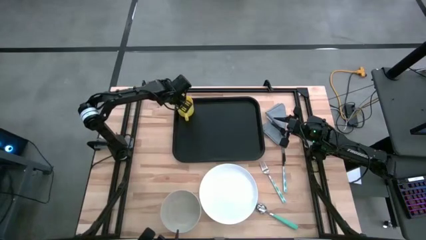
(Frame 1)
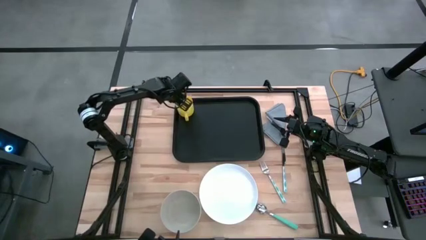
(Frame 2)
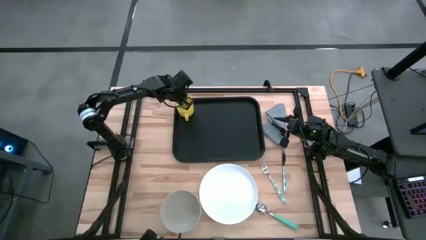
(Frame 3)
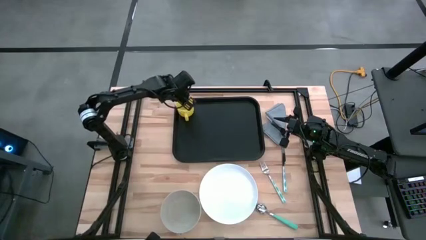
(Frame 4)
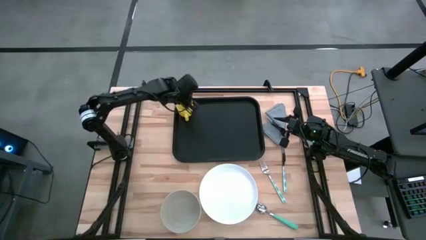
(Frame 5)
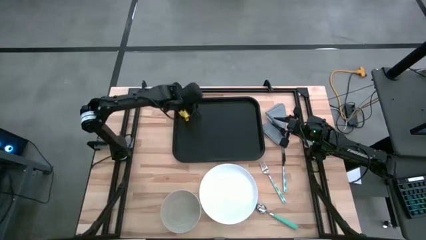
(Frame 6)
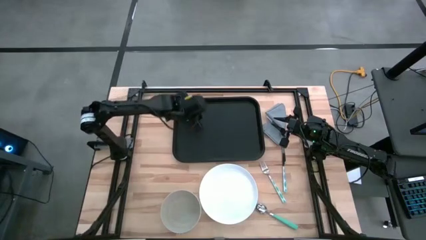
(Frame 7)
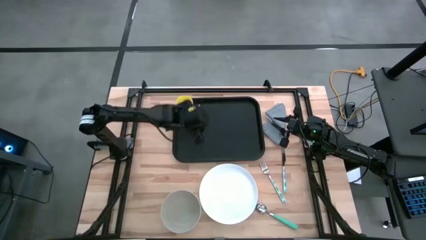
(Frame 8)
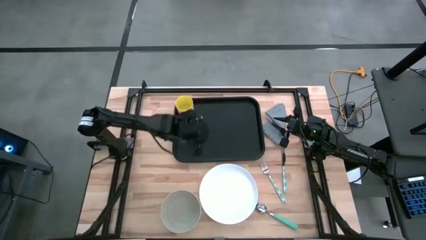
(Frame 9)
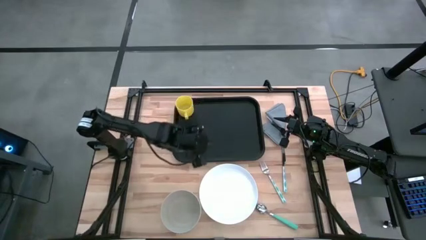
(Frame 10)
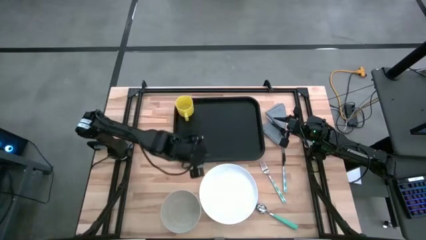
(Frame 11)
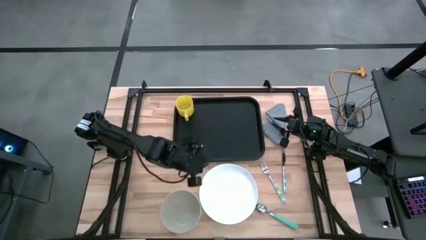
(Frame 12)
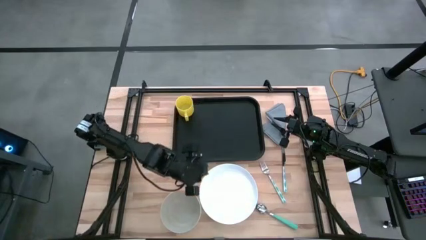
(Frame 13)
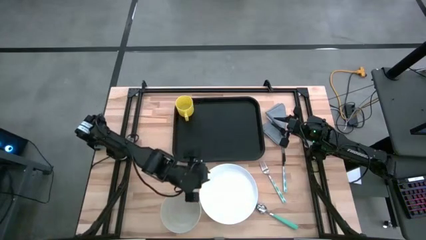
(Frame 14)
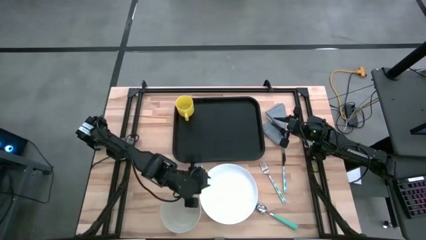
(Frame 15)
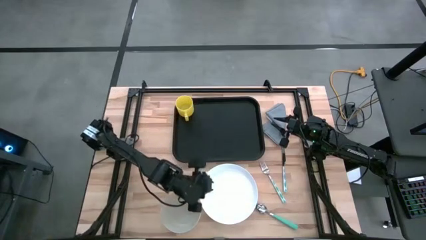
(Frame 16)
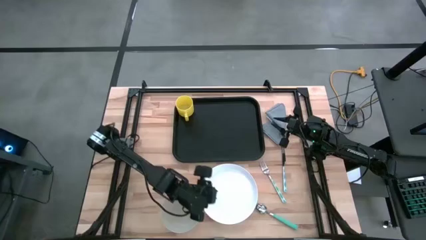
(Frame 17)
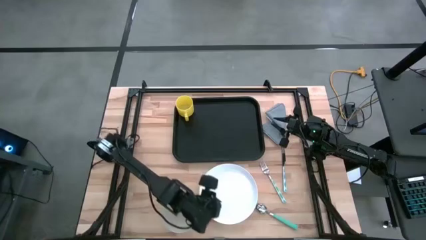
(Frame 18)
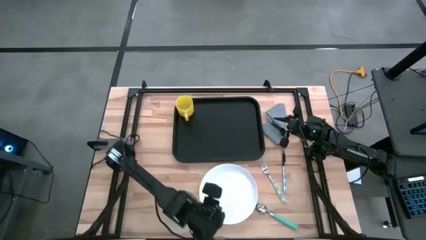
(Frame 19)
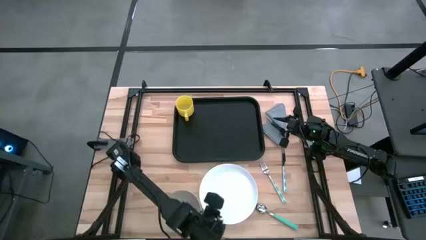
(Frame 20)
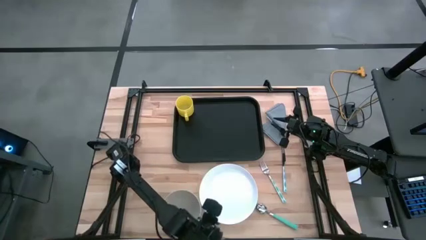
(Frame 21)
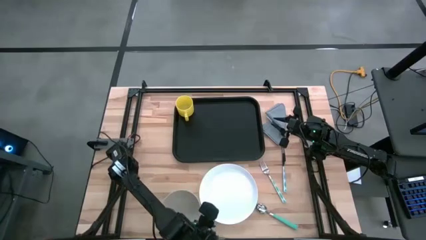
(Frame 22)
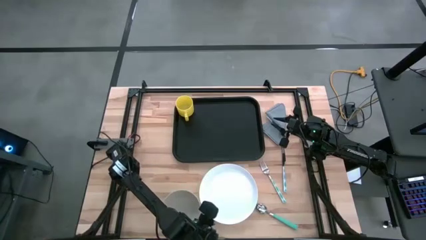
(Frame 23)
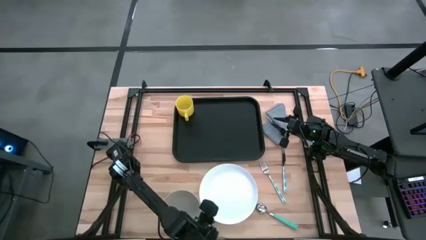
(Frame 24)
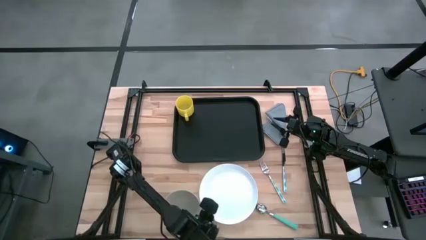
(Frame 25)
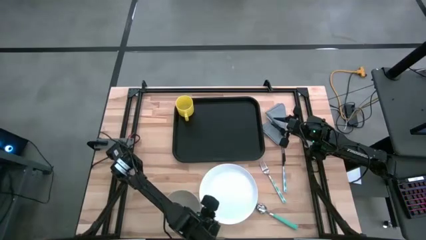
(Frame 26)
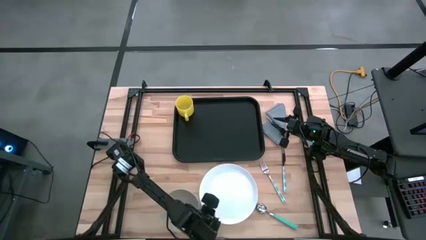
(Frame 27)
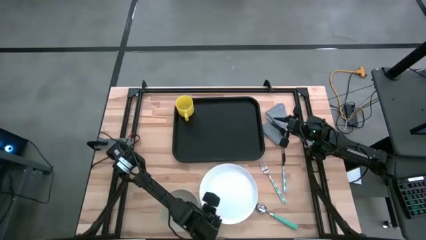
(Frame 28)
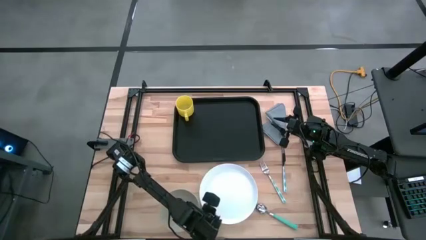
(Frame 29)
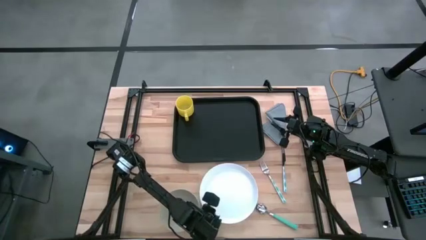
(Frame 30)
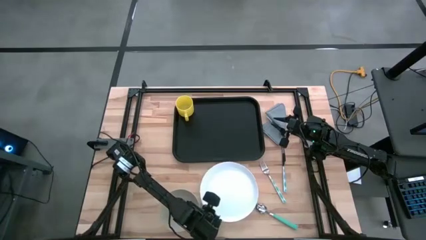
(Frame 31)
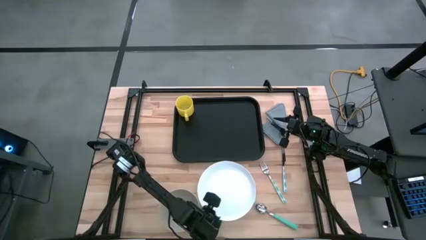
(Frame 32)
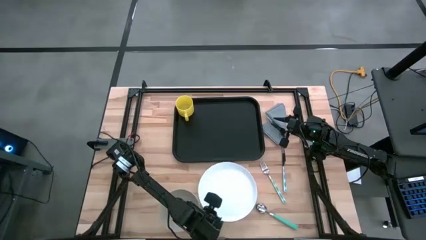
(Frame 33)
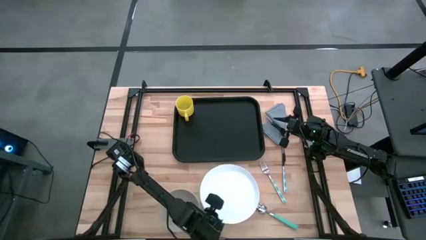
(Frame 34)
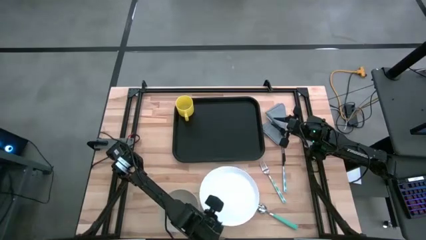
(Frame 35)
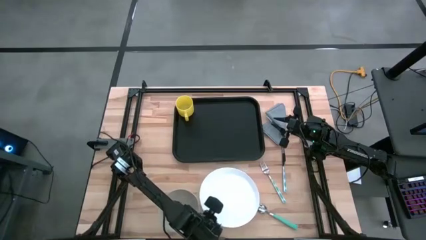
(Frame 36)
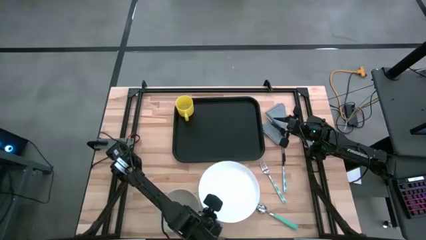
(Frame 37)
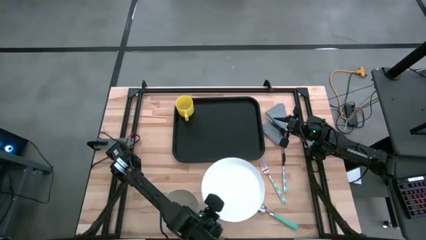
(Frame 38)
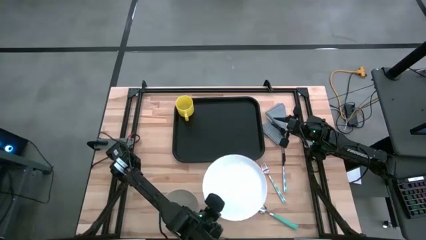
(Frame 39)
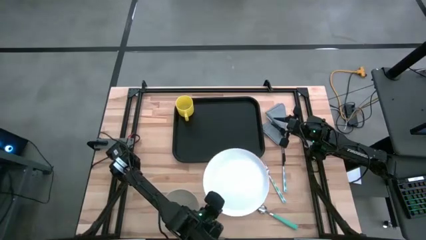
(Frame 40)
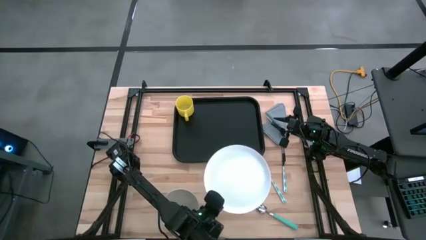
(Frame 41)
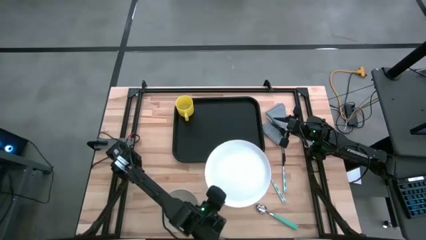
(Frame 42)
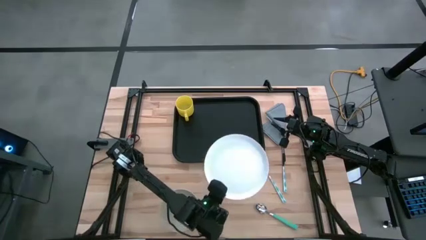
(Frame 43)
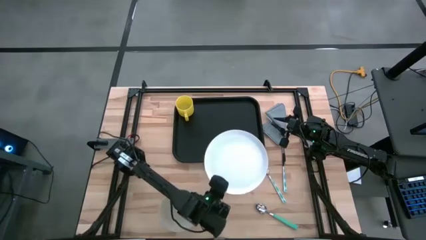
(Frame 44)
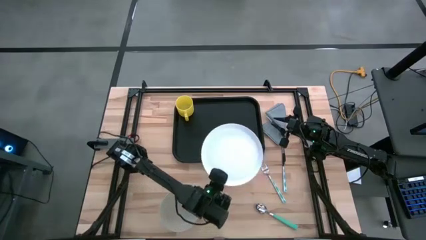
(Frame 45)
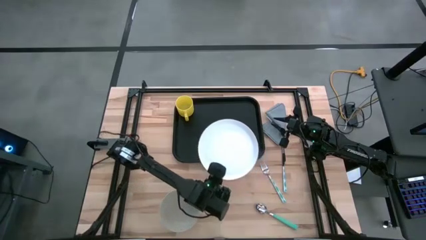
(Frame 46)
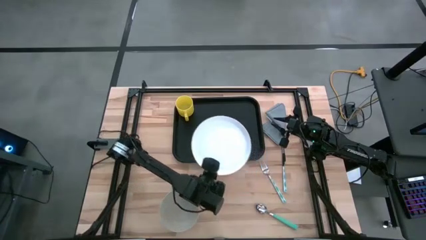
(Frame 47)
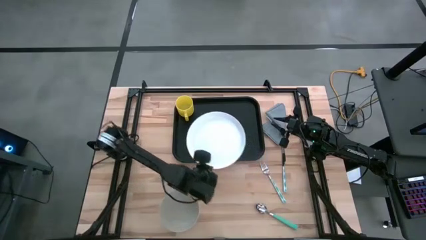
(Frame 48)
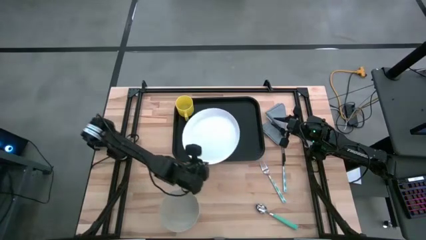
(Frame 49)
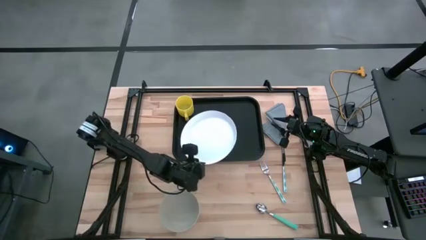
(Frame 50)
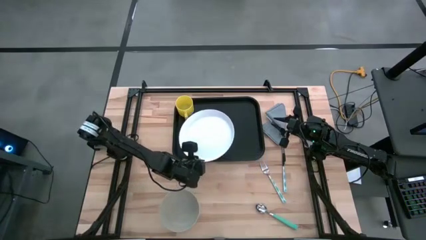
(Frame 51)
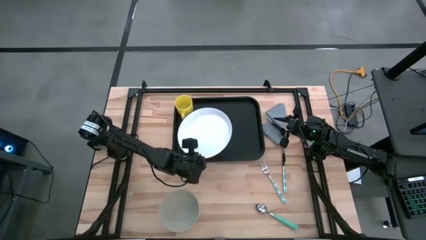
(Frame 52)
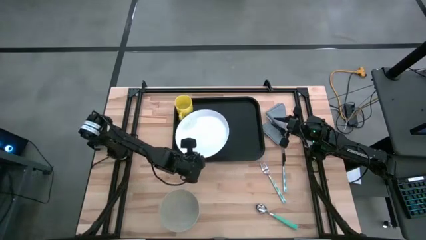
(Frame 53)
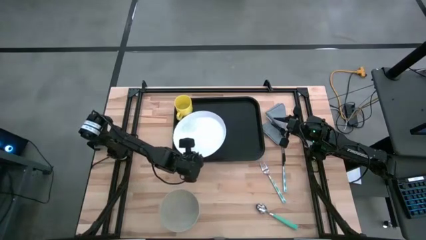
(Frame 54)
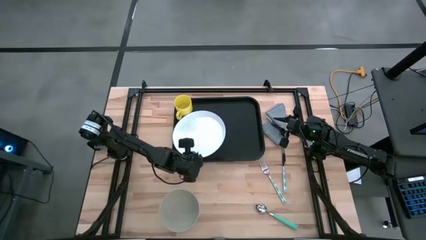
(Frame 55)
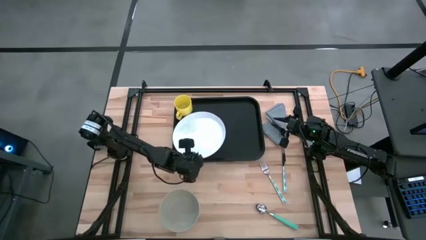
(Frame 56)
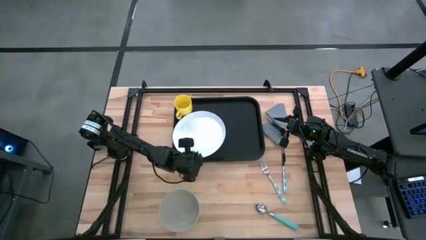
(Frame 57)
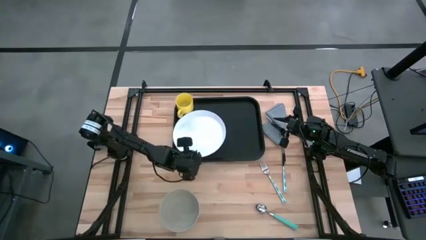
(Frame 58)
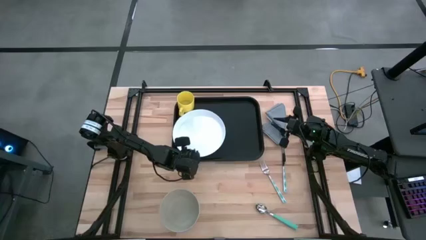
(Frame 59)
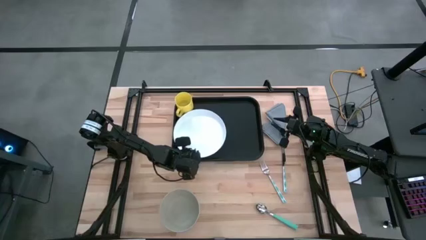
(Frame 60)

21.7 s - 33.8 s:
Task: Set up tray
Put the white plate on the black serving tray to the bottom of the yellow mug

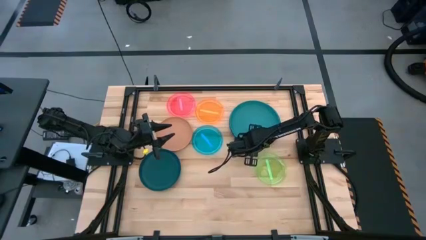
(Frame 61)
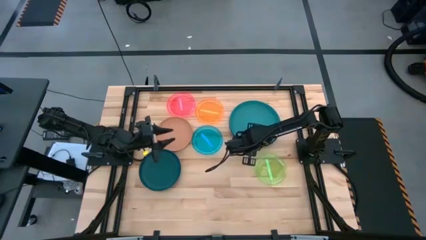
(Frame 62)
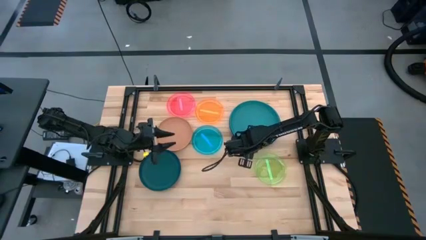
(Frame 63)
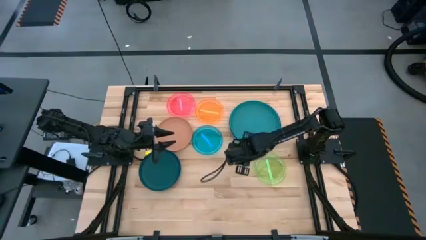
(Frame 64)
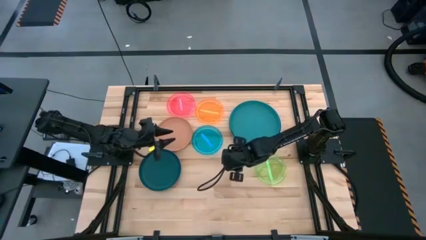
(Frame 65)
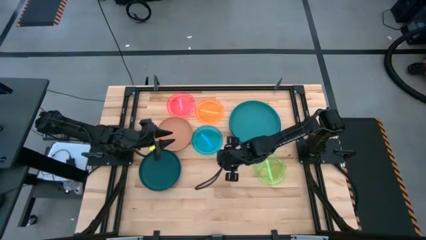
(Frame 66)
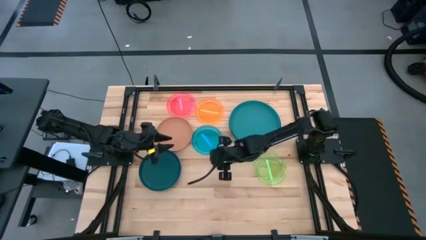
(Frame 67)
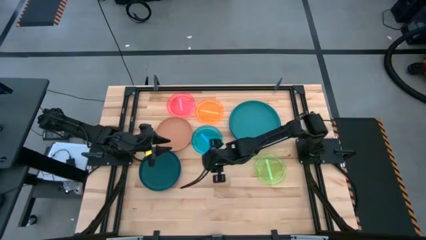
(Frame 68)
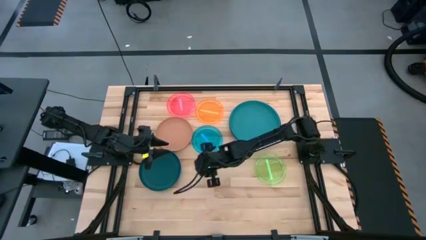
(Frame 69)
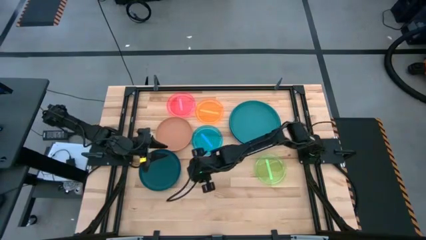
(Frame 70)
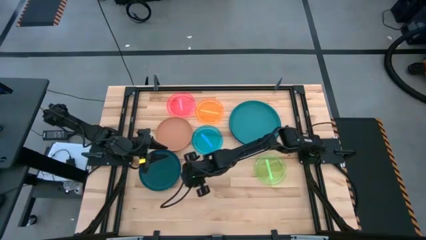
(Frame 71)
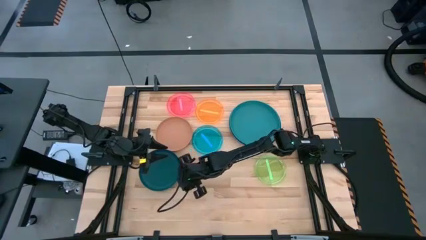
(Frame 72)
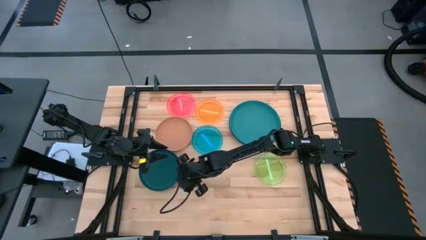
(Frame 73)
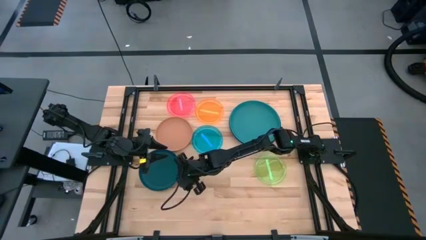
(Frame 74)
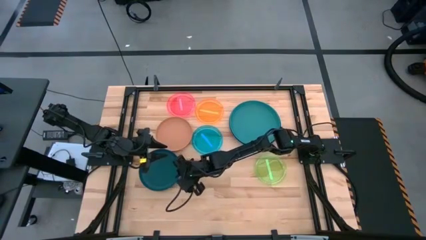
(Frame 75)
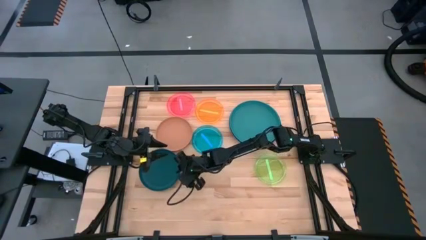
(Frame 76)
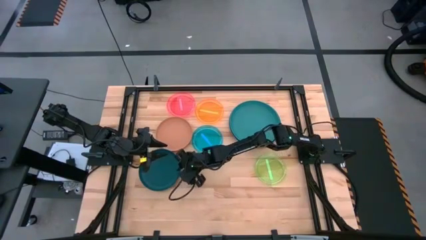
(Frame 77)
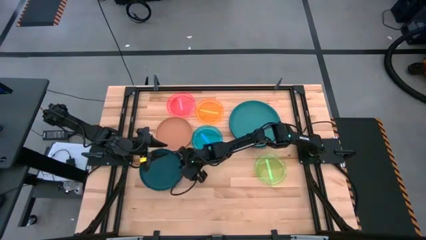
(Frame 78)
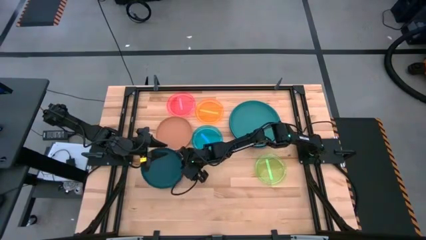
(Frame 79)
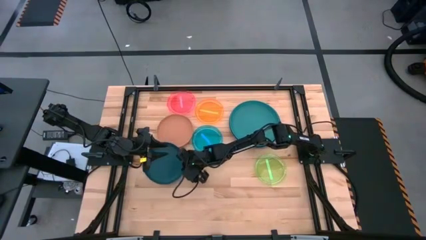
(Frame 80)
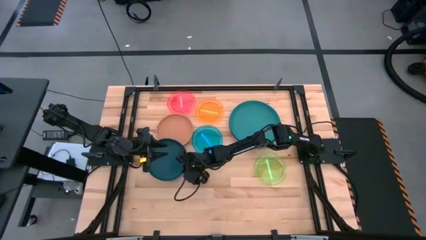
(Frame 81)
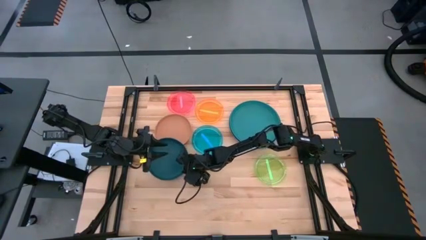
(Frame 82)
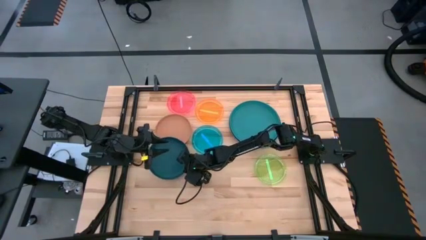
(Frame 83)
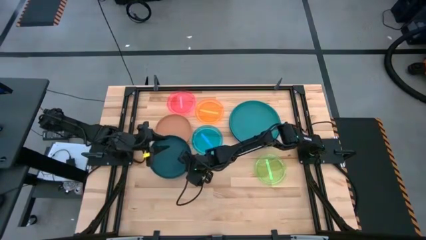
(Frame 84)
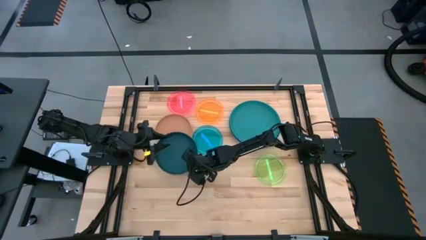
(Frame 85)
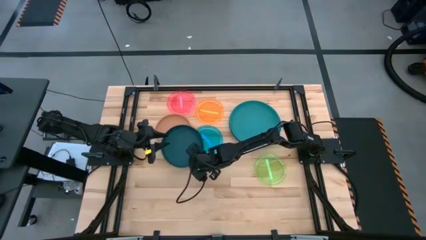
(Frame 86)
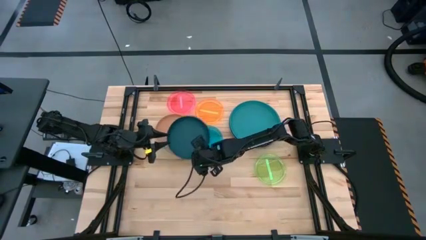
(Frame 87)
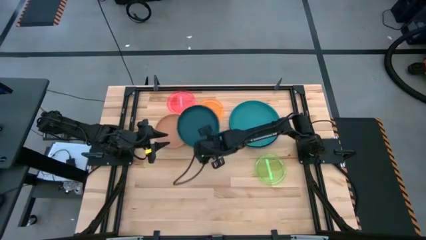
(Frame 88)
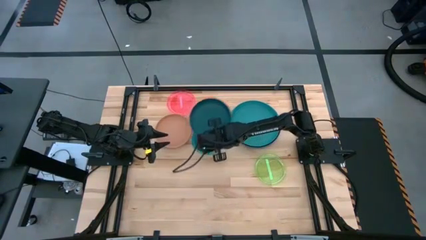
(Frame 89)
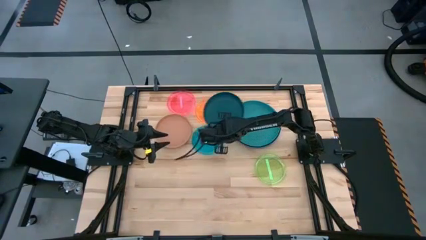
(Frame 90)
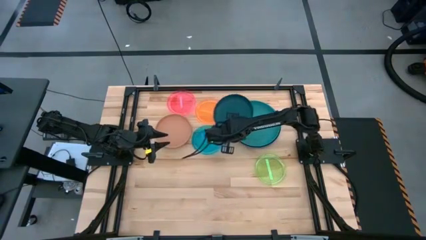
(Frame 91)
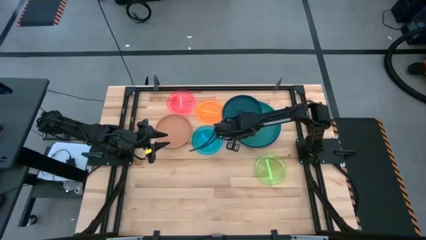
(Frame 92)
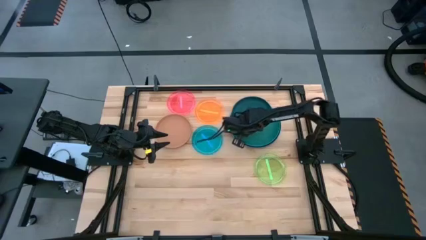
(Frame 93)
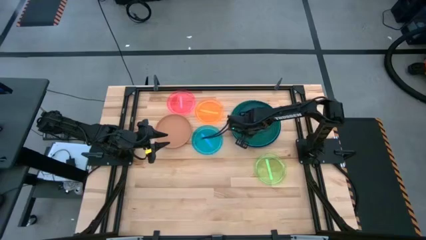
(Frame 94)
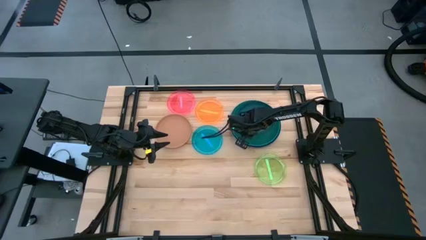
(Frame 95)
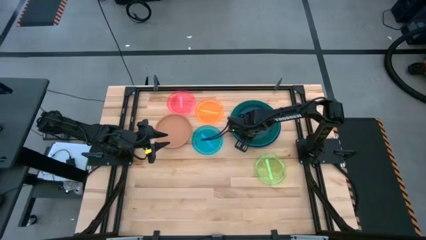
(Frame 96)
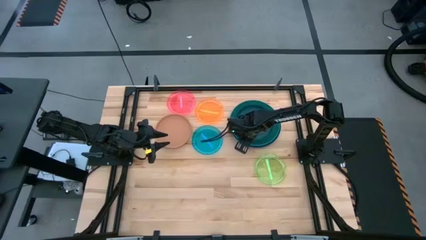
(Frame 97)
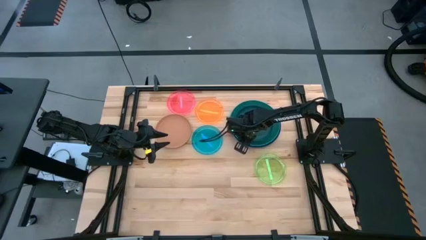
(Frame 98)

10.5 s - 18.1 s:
Task: Stack plastic plates
Stack the dark blue plate on the green plate
